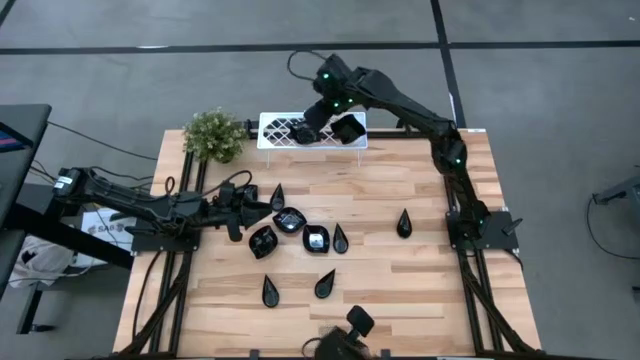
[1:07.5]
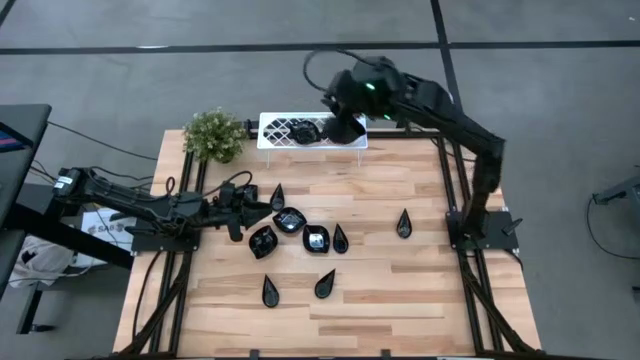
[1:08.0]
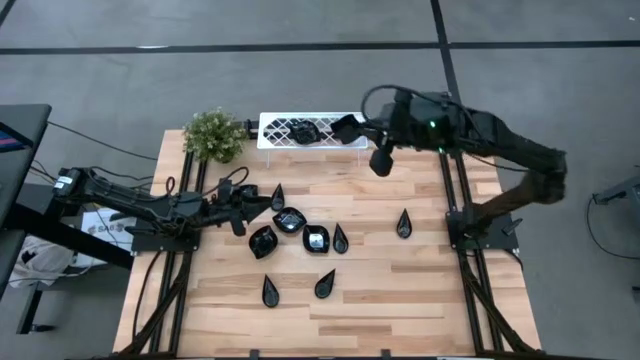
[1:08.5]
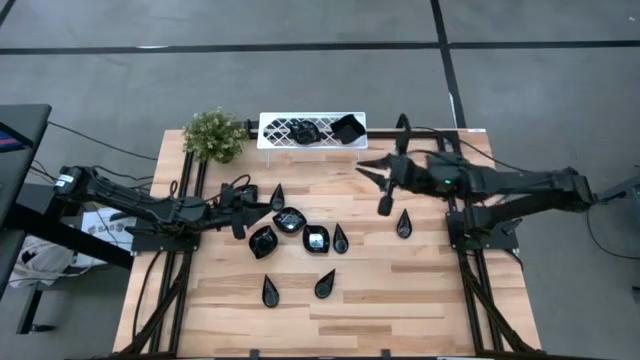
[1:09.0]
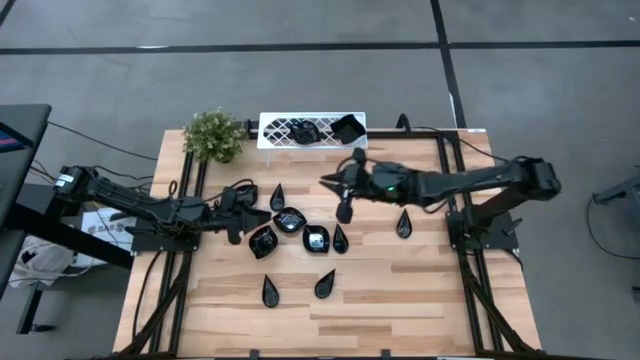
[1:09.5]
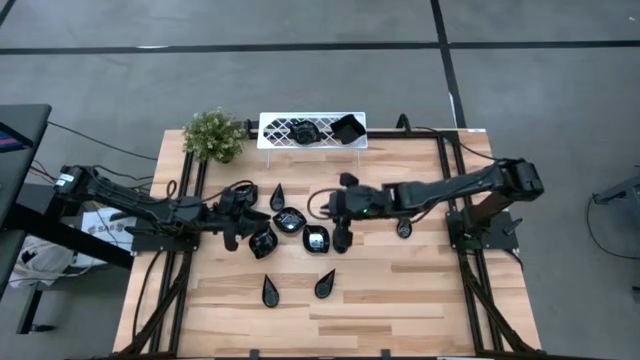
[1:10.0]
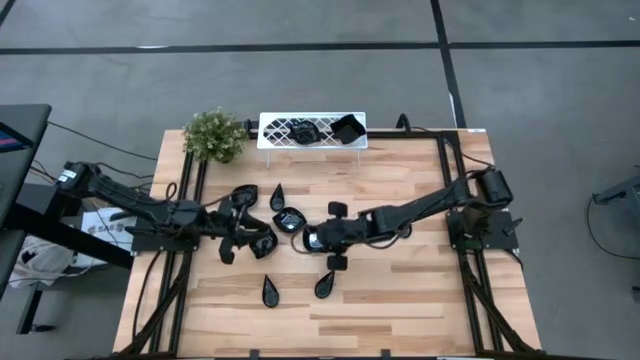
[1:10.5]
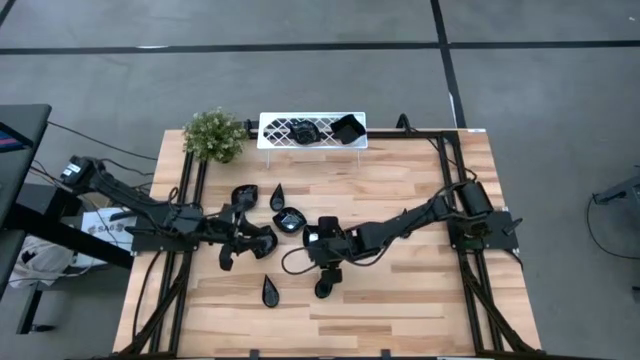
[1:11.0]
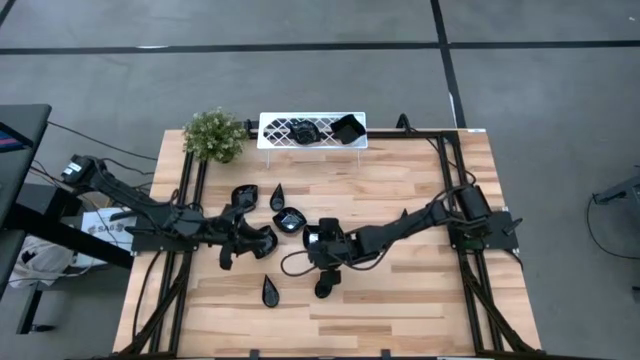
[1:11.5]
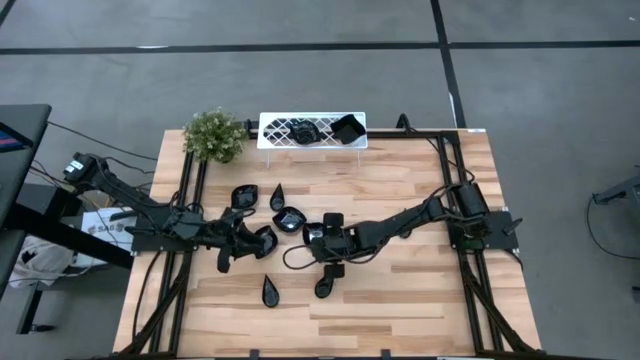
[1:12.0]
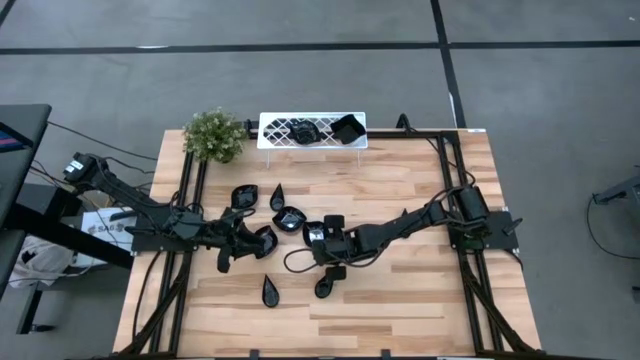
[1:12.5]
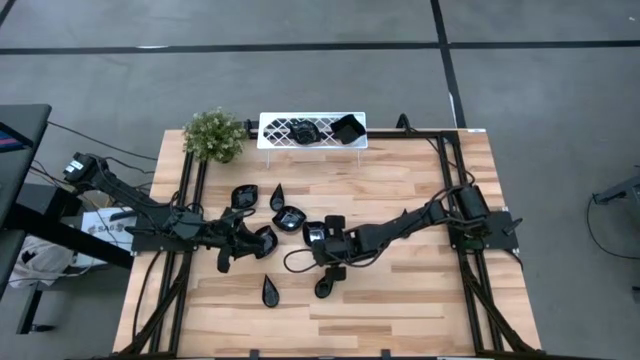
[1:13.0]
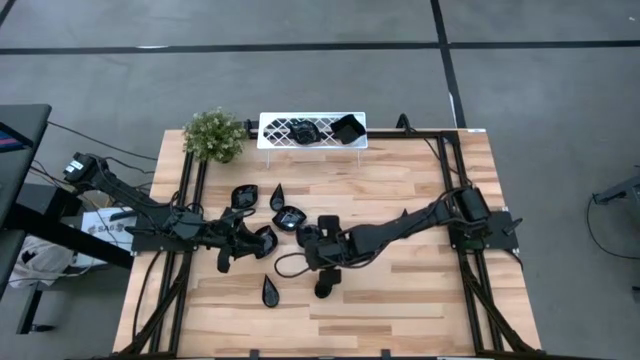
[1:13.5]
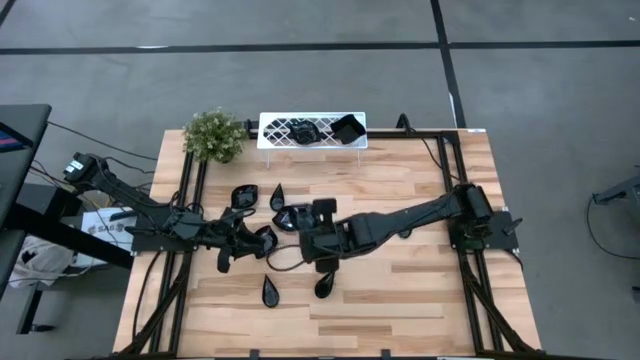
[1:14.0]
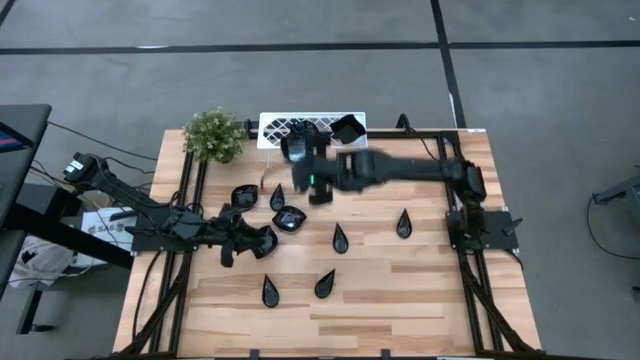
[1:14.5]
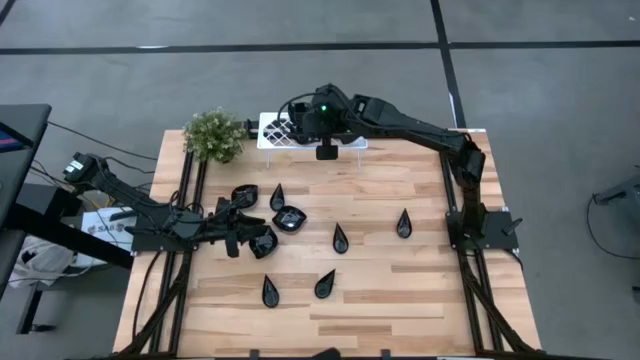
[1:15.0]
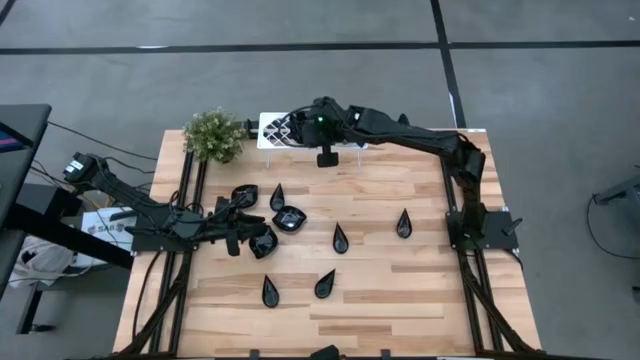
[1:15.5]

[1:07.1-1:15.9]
Task: Pick & Place Mini shaped plates
Stack the leaf shaped plate on the top of the leaf shaped plate on the shelf

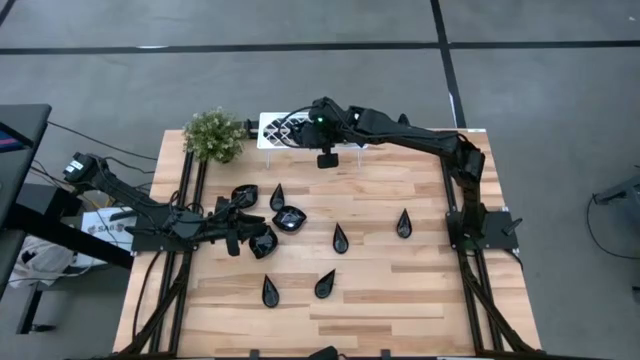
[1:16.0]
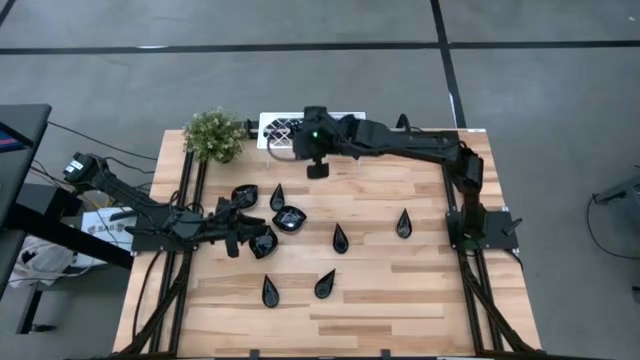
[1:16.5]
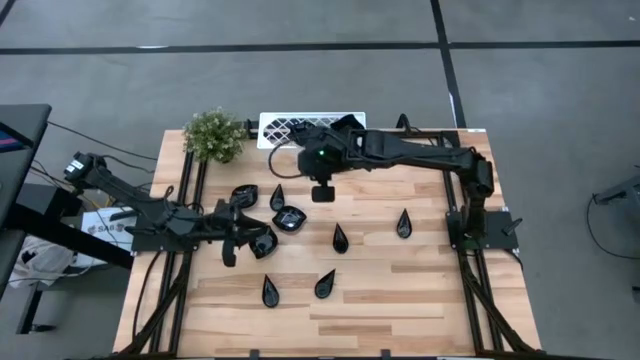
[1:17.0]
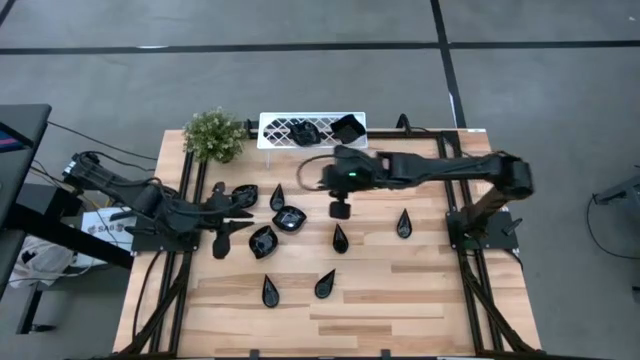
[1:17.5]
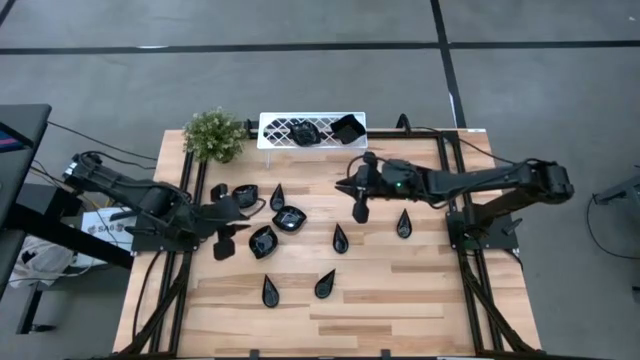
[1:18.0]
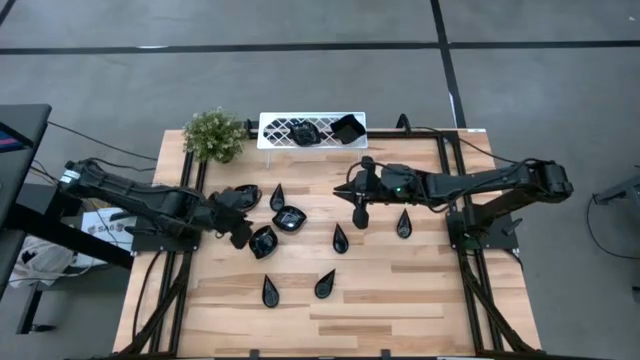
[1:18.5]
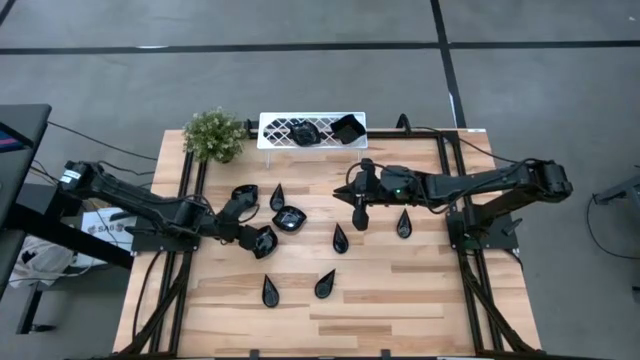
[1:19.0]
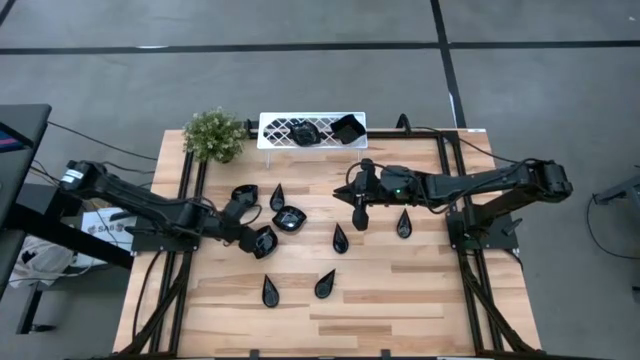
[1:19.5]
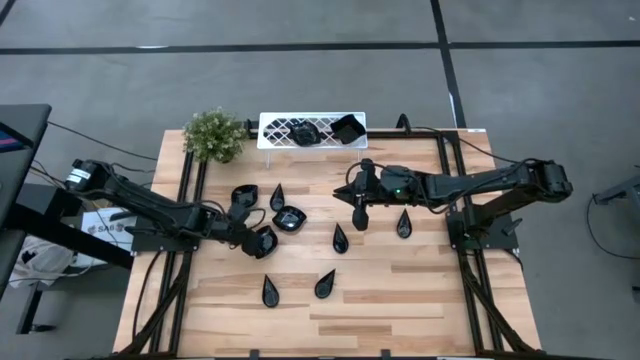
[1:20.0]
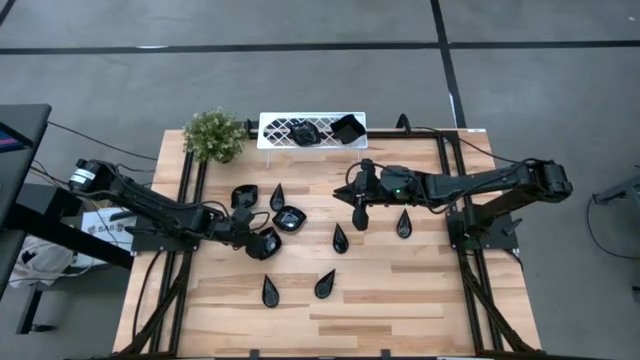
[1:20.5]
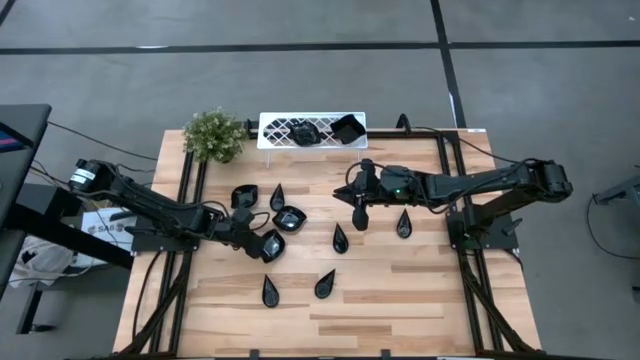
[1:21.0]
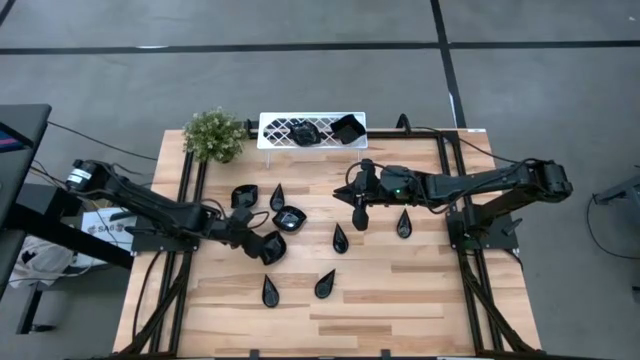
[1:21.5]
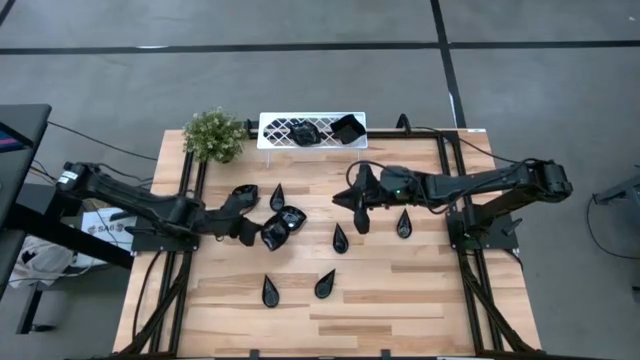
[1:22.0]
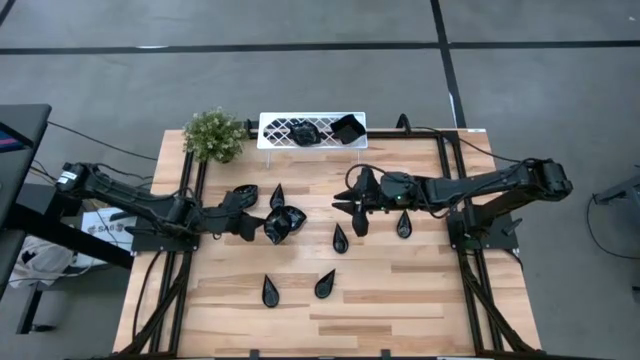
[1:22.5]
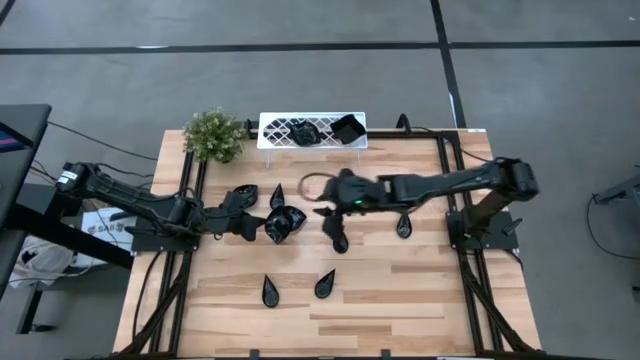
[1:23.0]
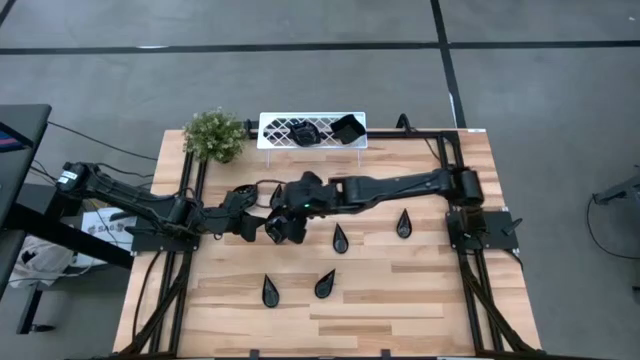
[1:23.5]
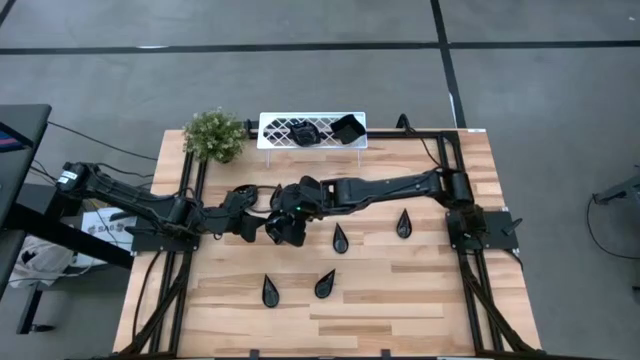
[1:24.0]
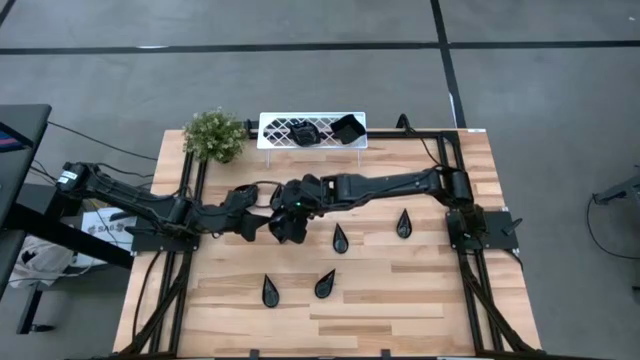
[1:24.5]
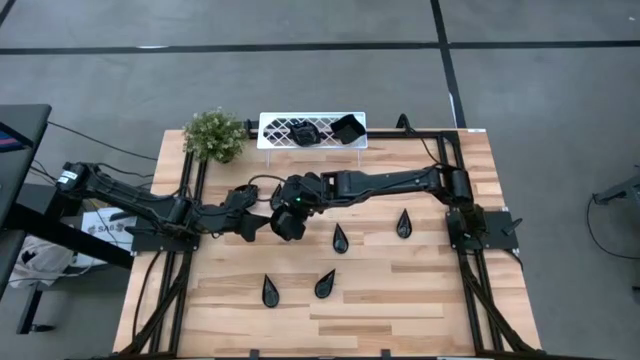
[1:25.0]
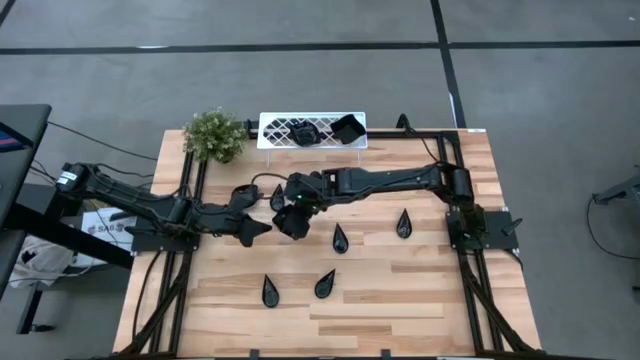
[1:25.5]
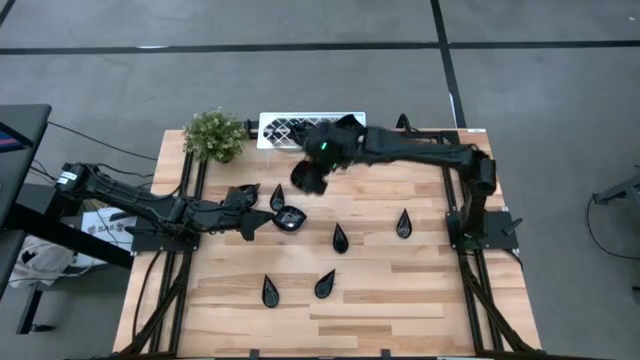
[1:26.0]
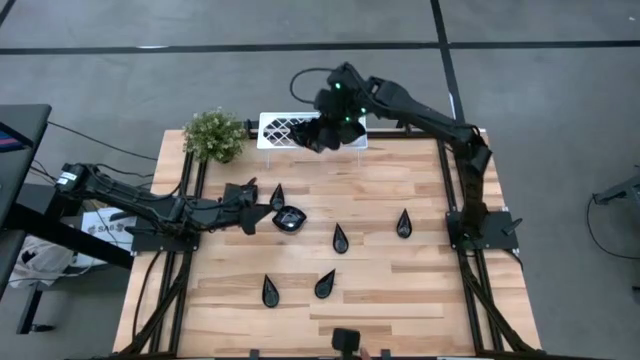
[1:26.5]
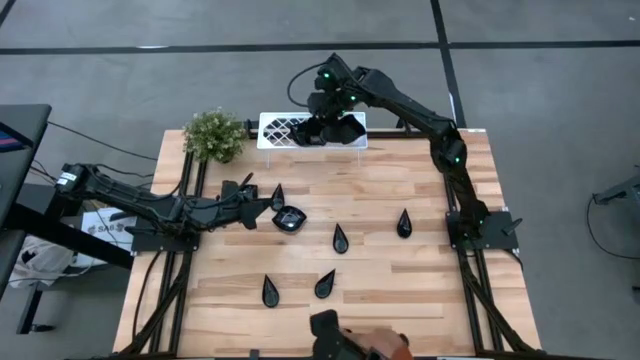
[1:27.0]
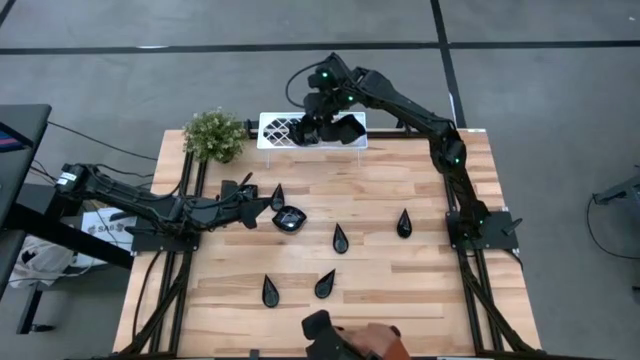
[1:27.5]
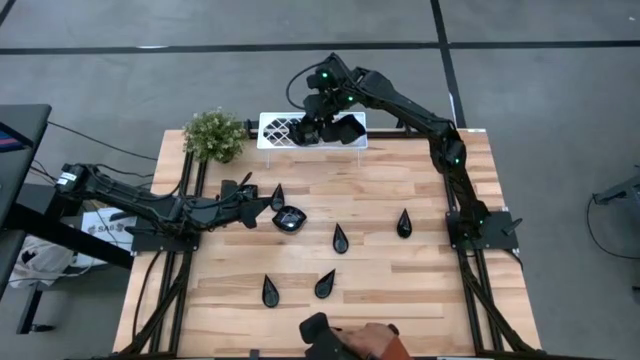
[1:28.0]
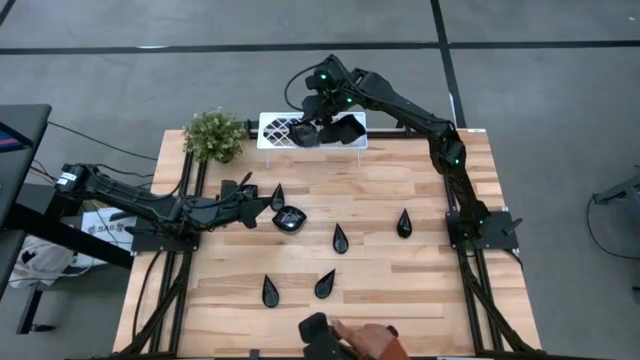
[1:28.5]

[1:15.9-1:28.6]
Stack the bottom leaf shaped plate on the top of the leaf shaped plates on the shelf
